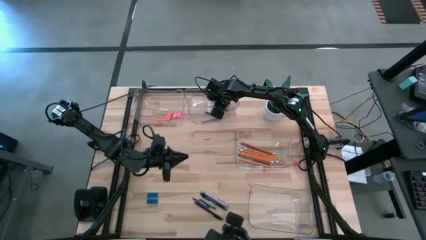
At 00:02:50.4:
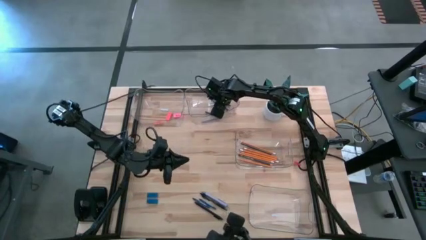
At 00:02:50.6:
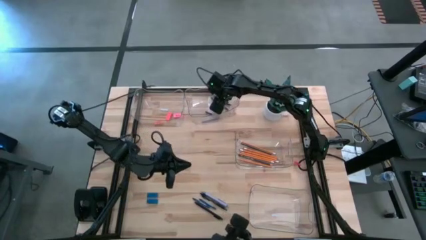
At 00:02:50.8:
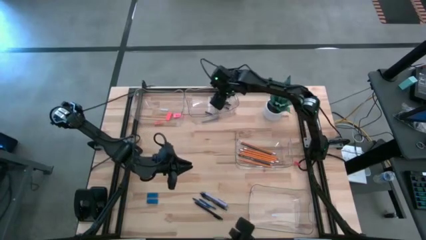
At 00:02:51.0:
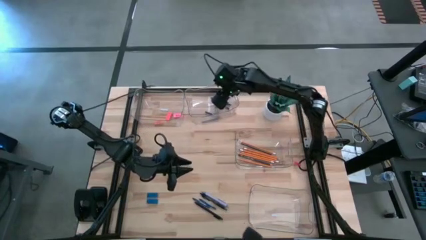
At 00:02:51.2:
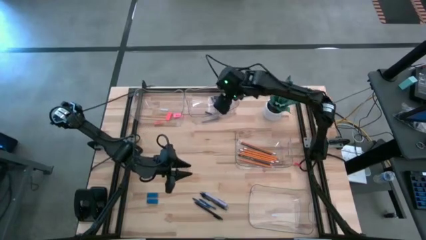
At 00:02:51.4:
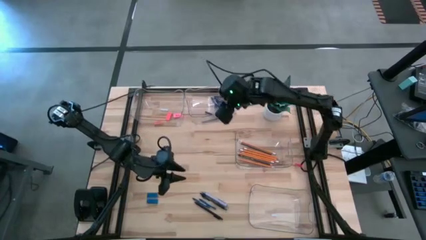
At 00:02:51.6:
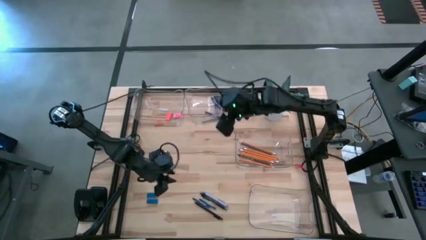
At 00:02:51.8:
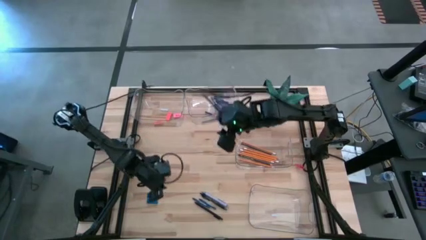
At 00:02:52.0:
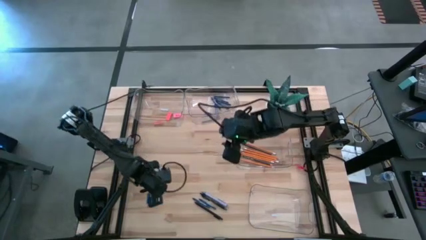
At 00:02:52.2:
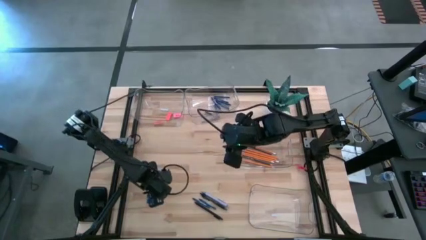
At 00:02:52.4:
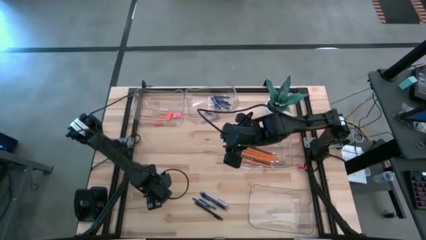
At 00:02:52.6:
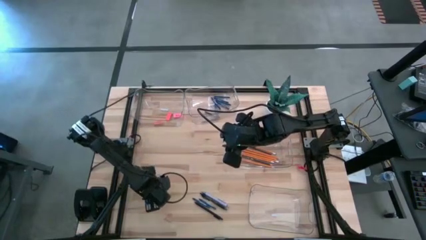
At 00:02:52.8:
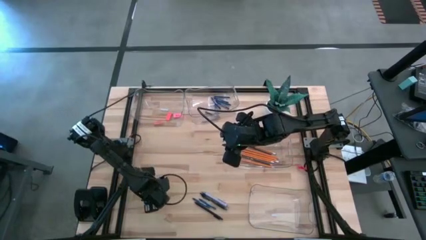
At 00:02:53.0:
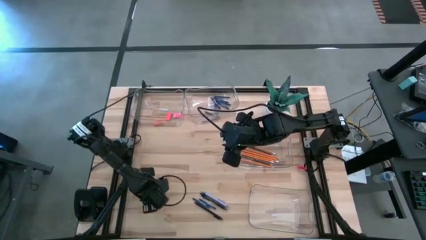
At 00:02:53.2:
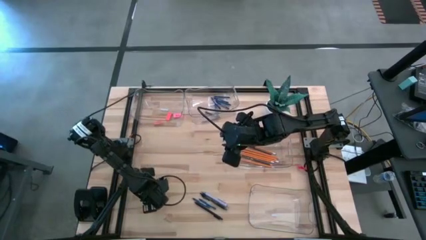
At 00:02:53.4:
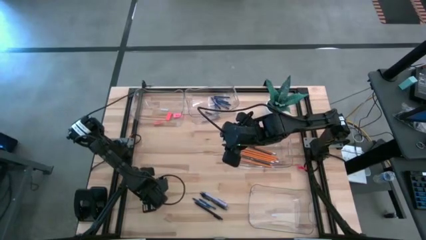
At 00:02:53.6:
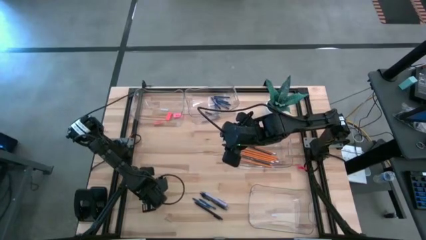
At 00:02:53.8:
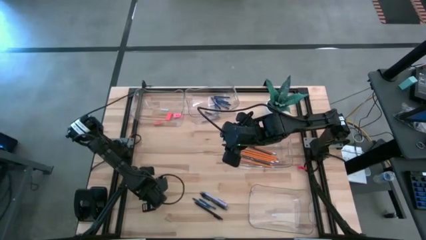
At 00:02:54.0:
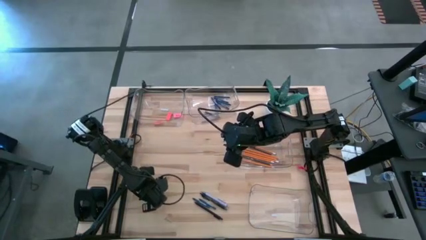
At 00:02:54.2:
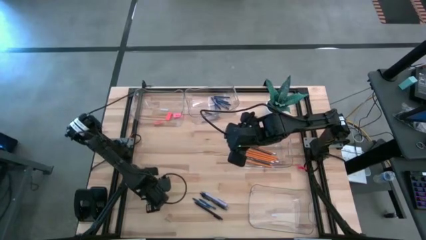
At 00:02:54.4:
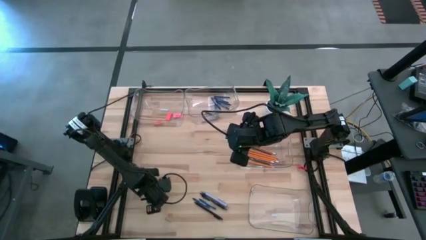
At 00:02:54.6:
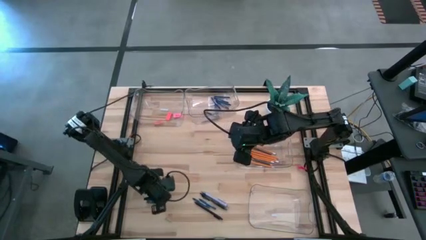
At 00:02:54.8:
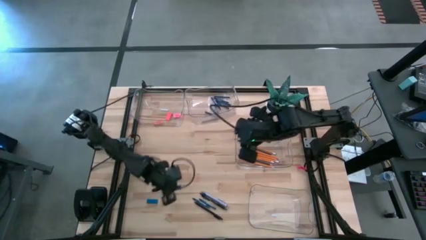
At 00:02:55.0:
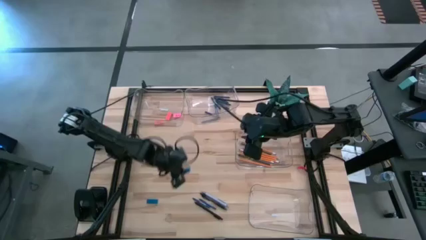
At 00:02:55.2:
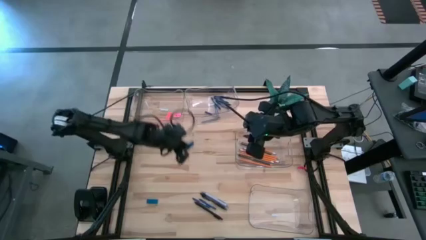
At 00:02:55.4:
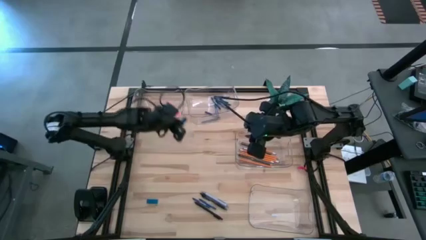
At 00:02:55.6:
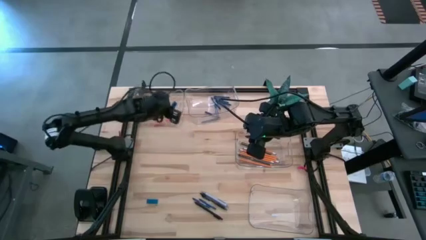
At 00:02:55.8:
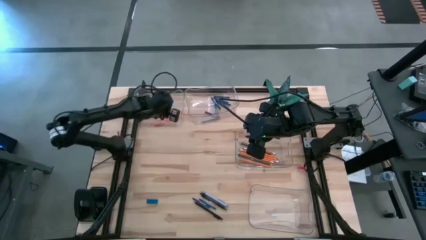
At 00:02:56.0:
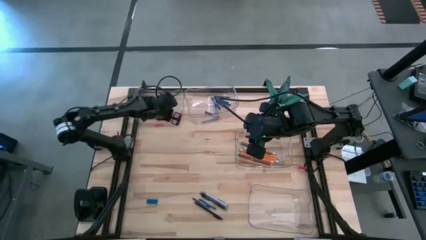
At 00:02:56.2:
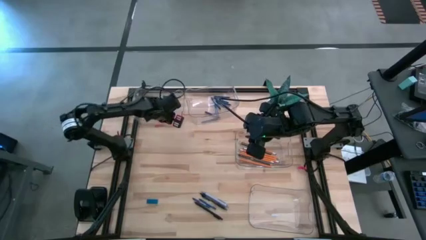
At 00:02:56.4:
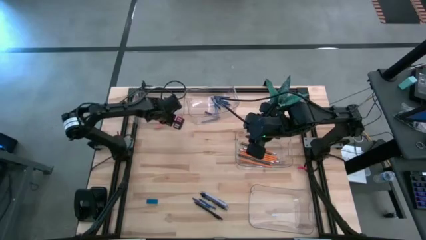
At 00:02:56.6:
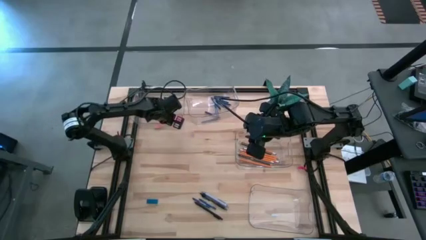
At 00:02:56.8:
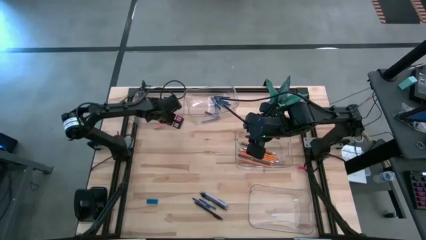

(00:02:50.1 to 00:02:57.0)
Task: Sort crayons/erasers/pens/pencils in bins
Put the blue eraser into the top left transparent bin

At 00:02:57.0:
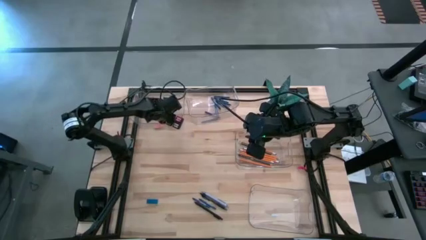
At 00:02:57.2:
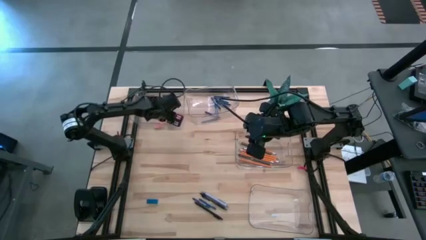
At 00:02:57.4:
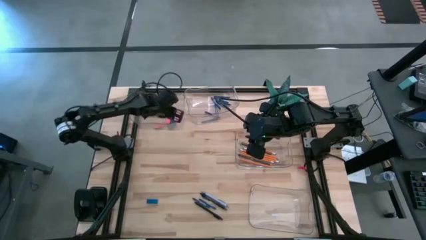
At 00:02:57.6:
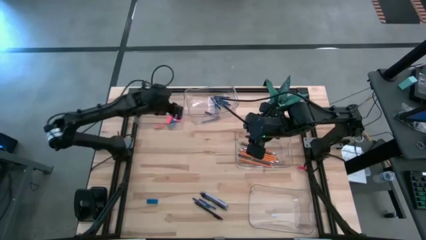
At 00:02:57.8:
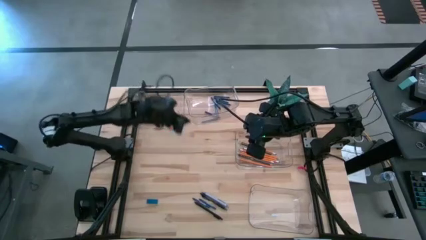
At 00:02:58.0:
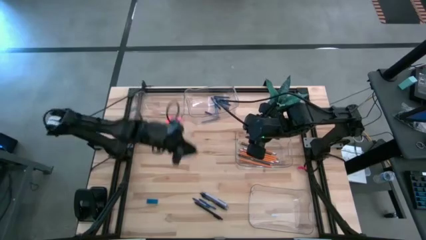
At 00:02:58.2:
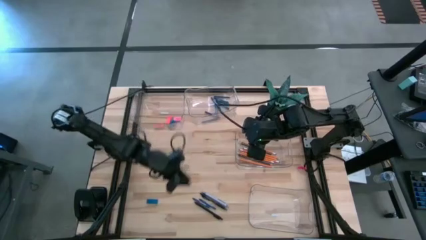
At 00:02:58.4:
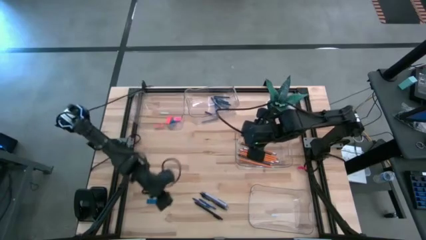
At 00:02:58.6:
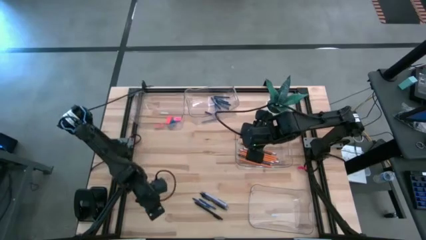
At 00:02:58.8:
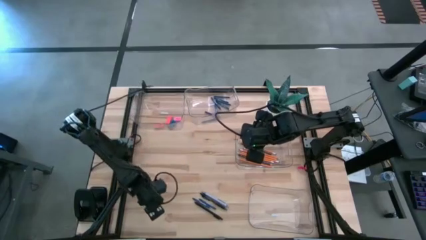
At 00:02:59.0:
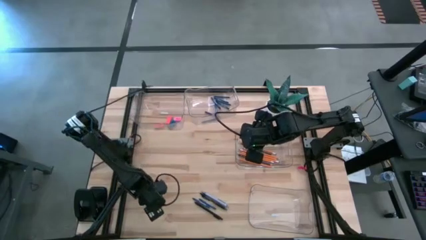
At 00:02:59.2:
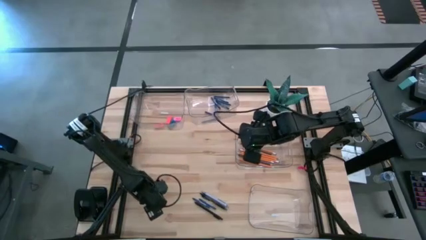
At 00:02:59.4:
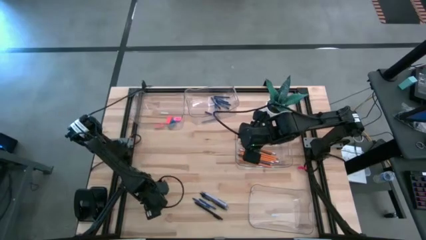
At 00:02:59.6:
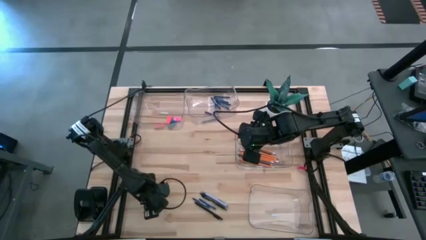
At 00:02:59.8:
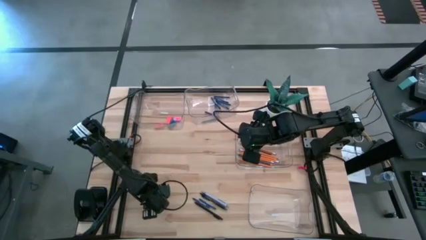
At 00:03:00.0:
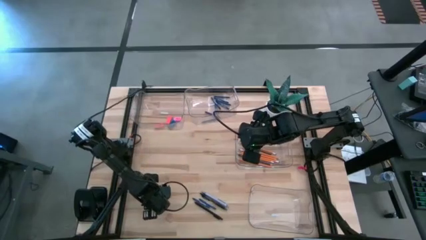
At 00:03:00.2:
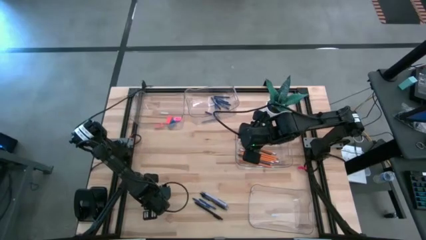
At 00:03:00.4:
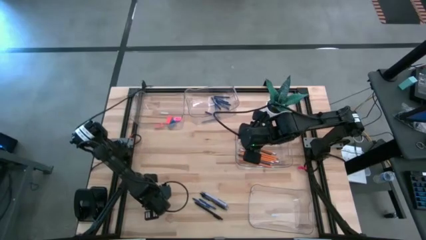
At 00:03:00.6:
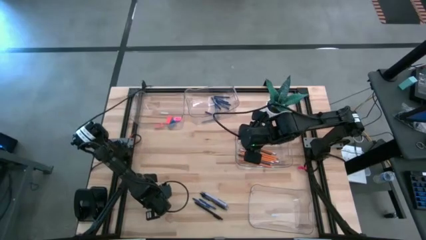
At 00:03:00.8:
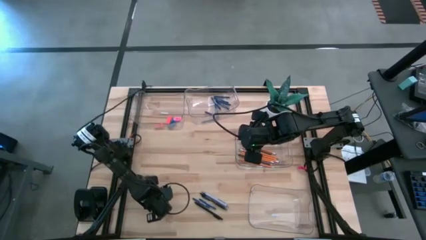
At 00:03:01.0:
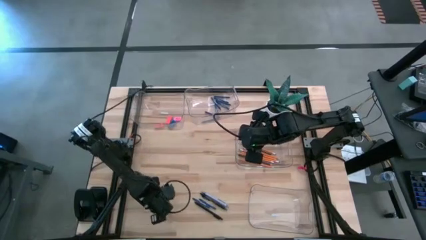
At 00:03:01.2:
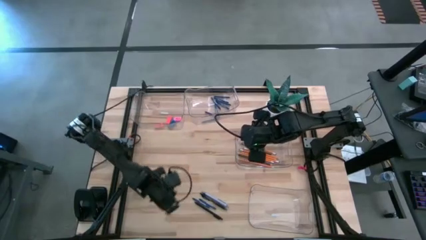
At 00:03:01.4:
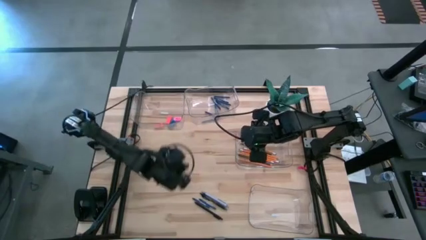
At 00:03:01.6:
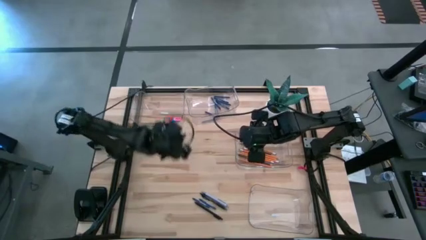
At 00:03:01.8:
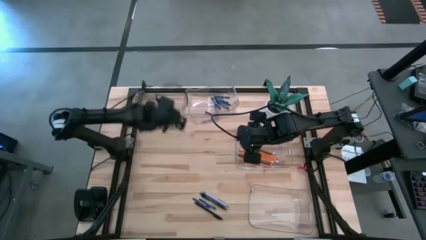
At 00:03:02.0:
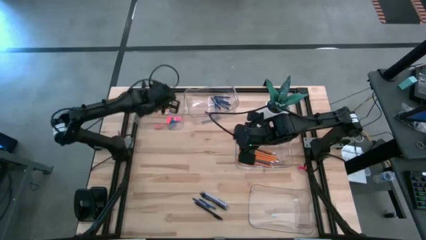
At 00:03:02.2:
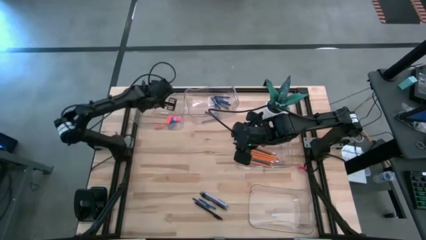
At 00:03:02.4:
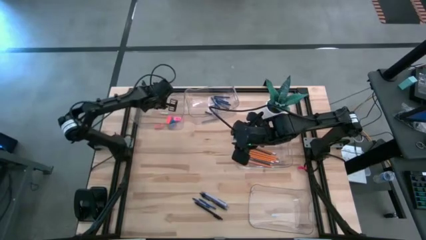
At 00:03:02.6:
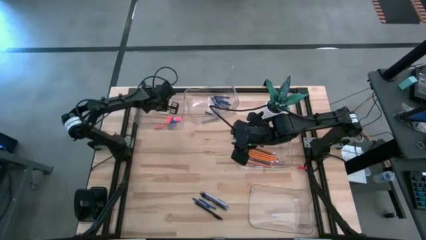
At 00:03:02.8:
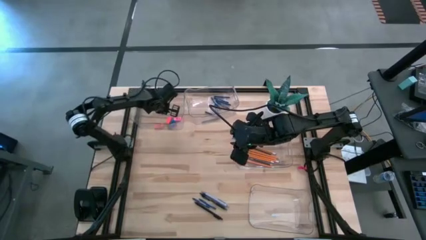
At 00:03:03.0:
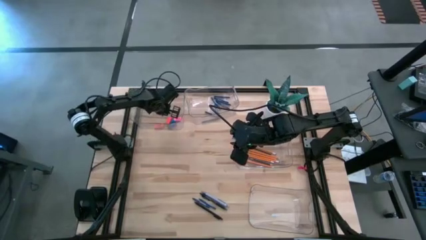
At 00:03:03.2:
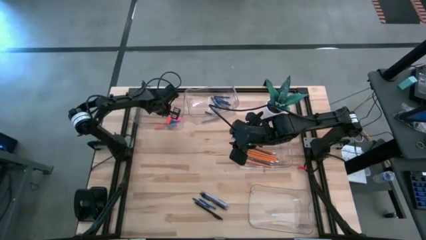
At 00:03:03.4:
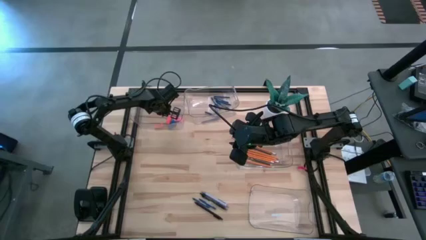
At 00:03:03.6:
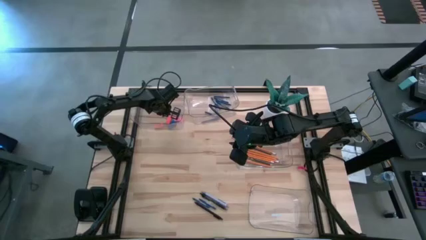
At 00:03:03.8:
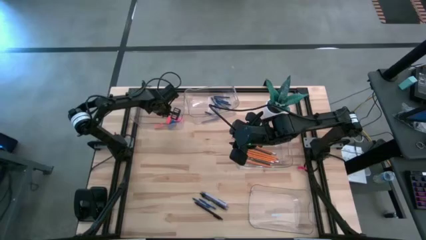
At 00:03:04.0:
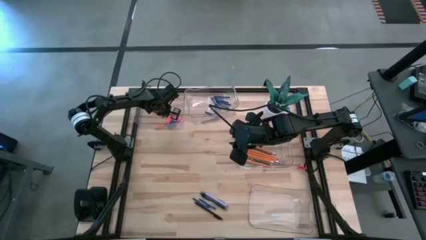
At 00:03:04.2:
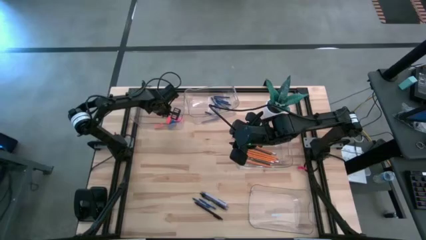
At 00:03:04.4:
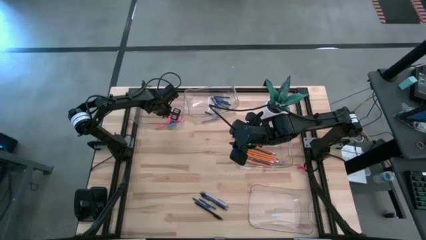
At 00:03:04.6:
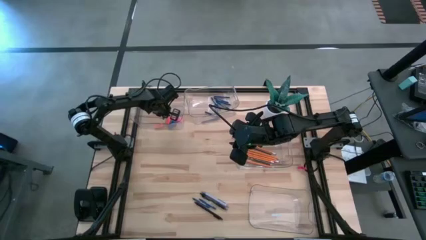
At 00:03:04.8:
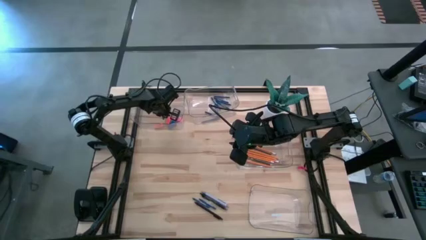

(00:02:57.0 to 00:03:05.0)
Put the blue eraser into the top left transparent bin
